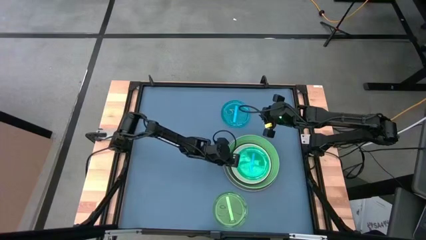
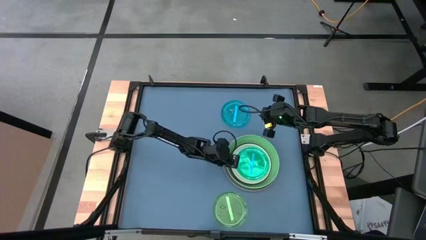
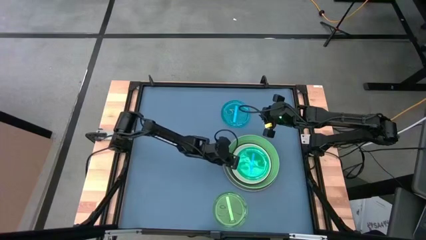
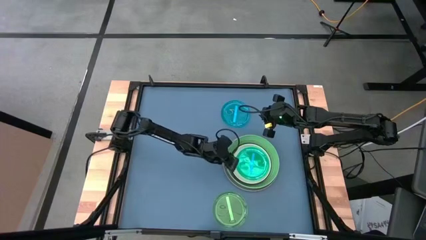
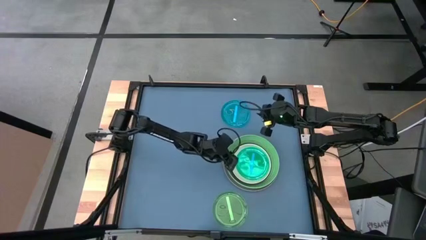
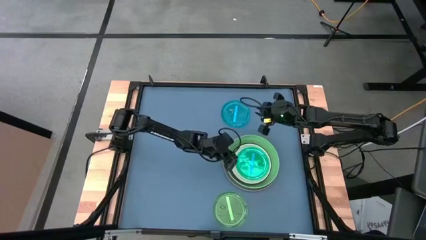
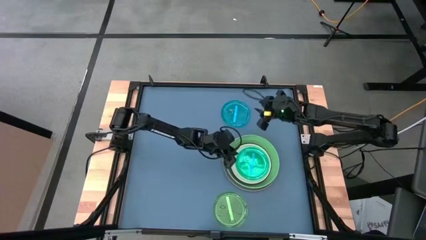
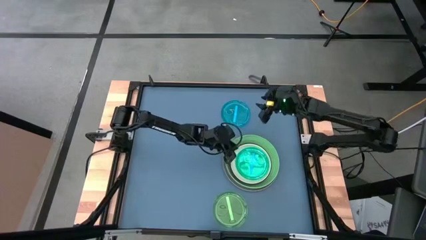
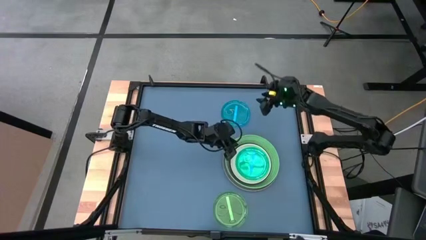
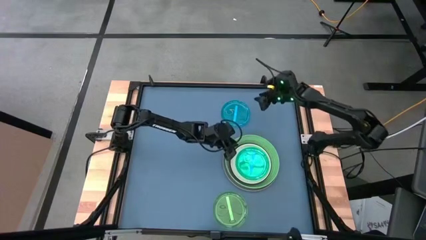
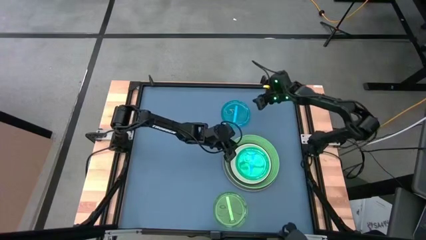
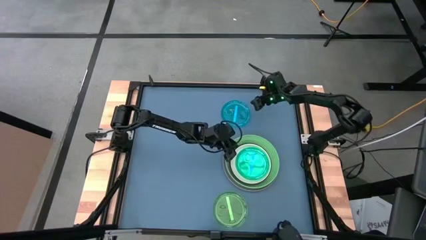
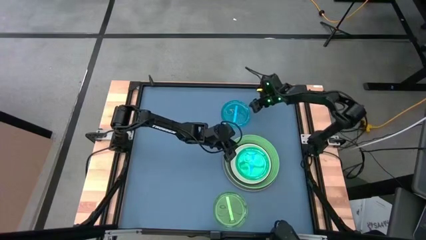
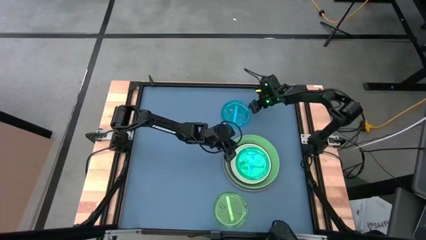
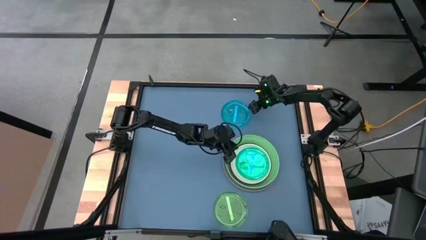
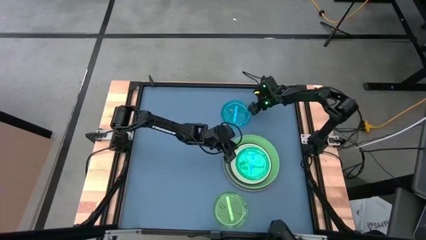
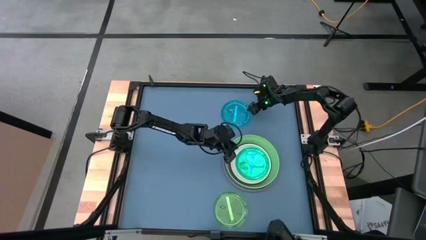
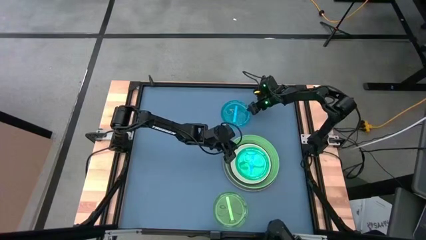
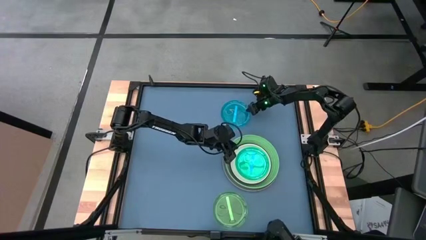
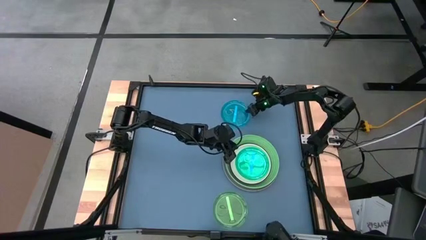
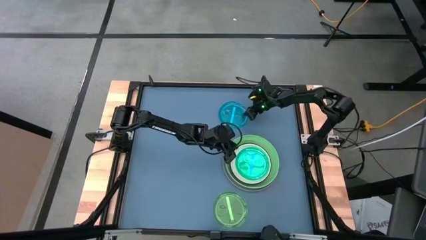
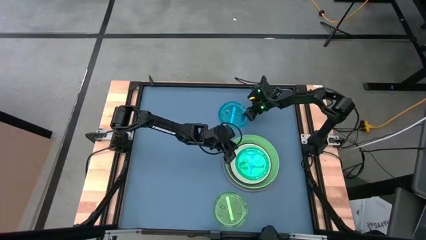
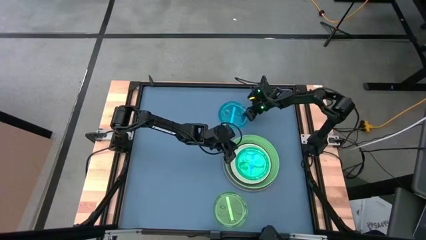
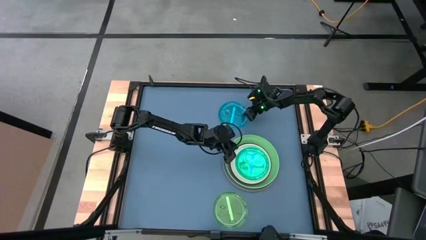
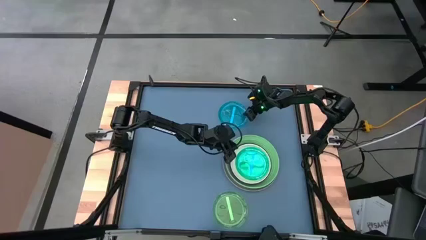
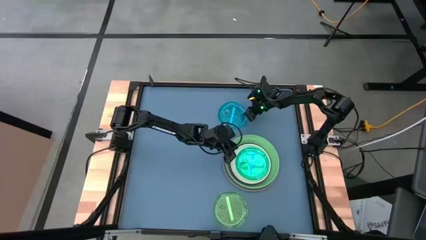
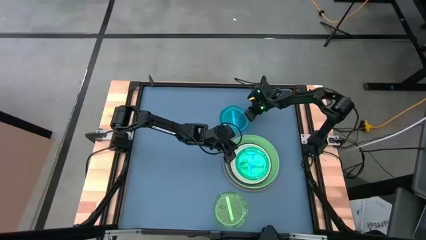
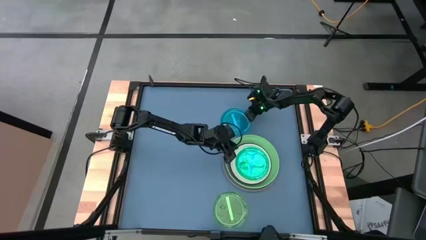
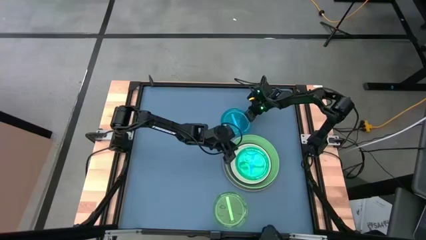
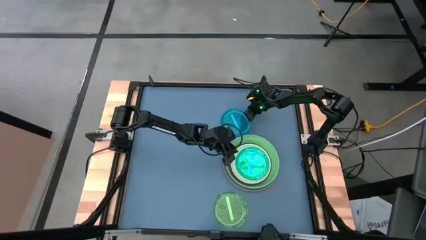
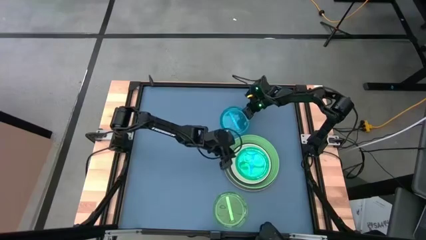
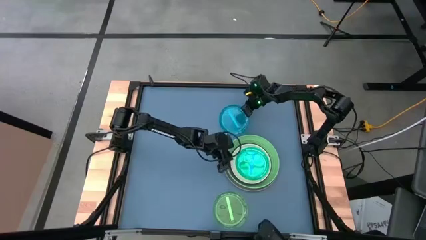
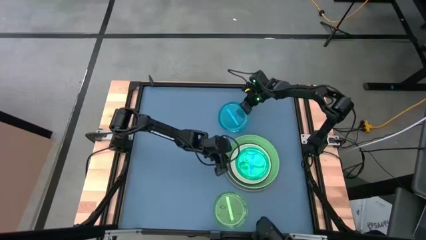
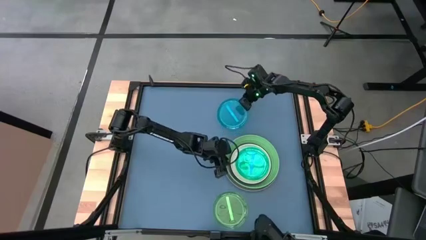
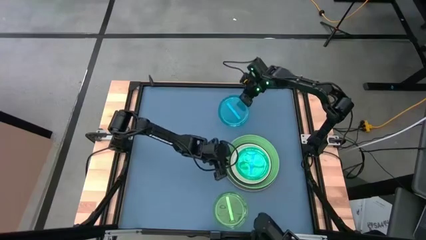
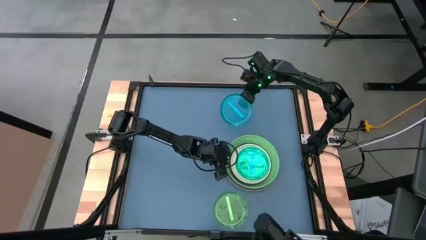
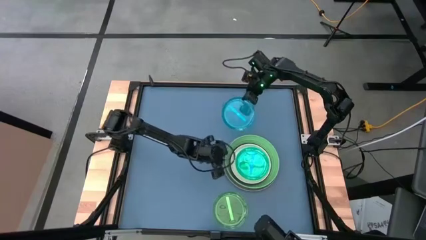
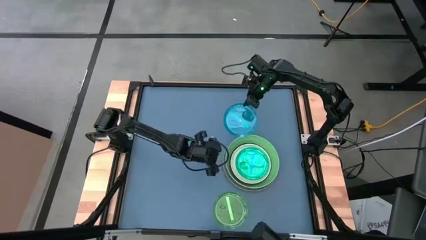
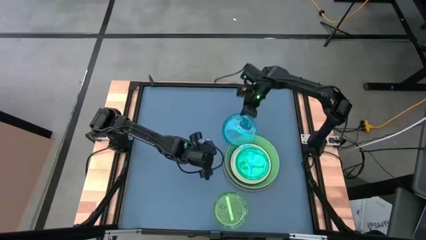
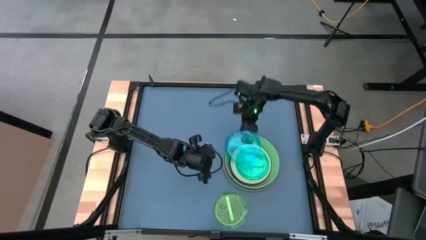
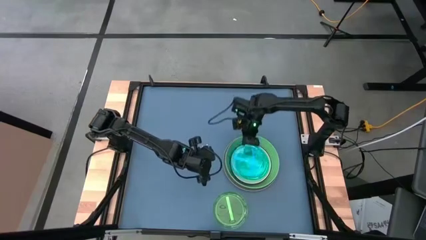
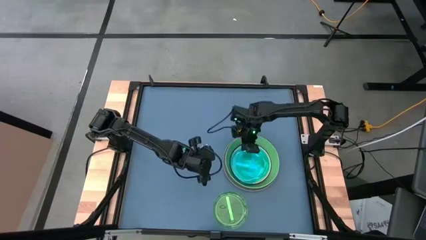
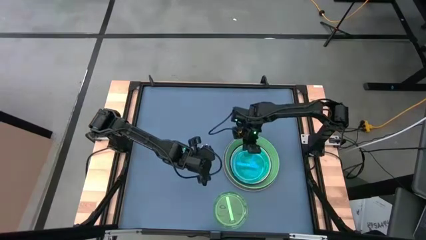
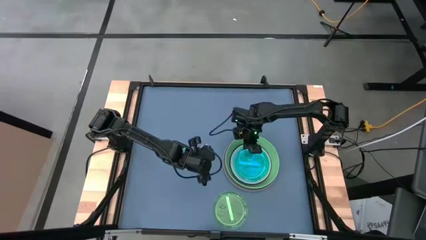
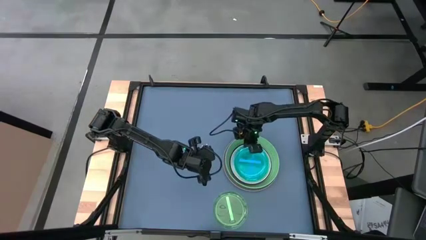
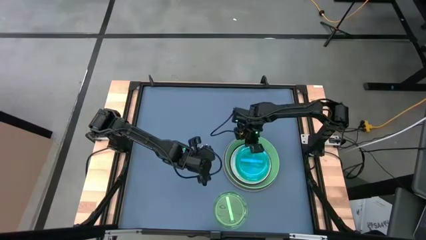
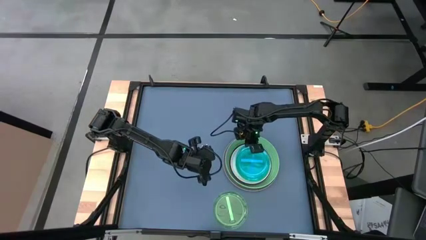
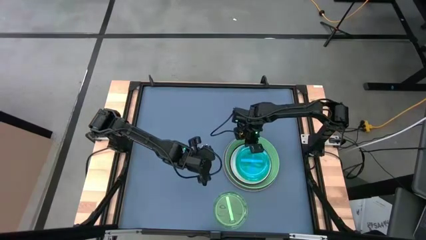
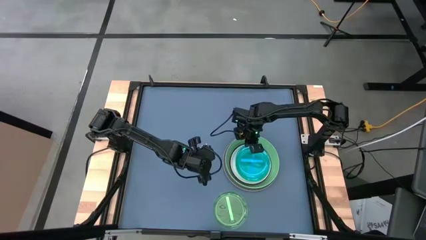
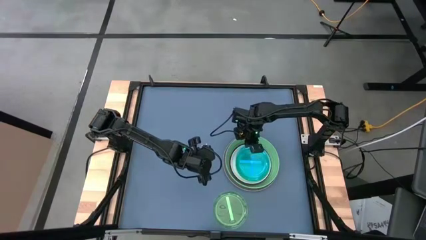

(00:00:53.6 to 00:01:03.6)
Task: Stack plastic plates
Stack the blue plate on top of the blue plate
